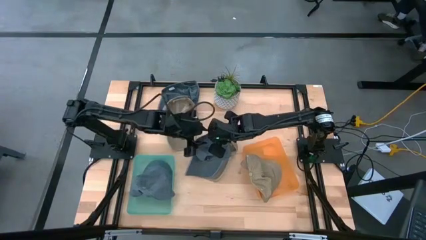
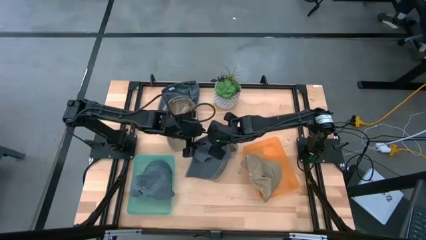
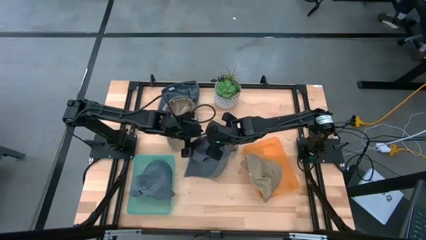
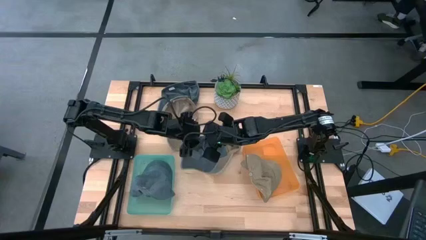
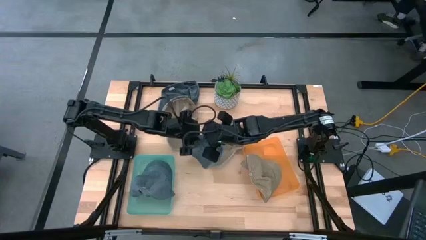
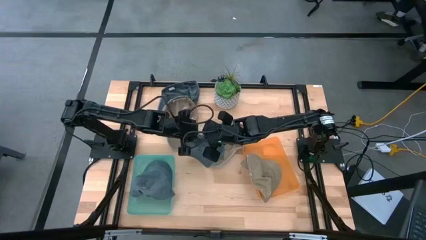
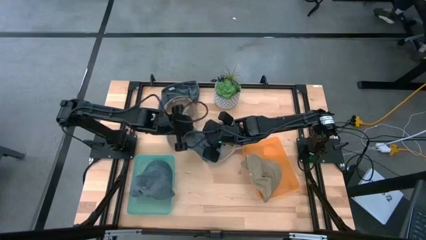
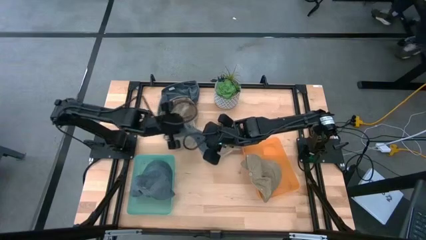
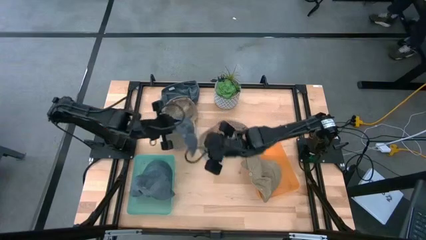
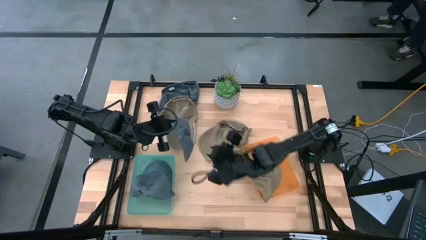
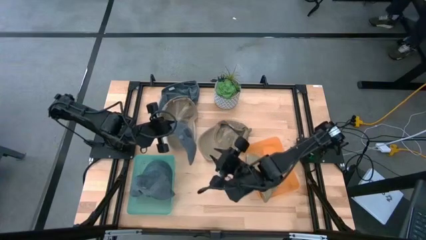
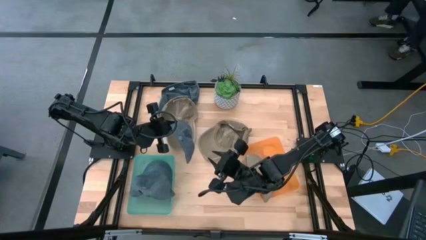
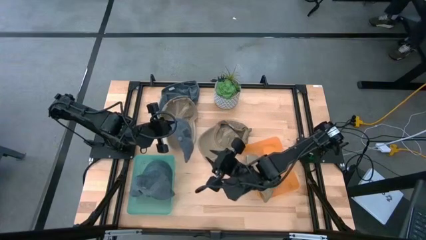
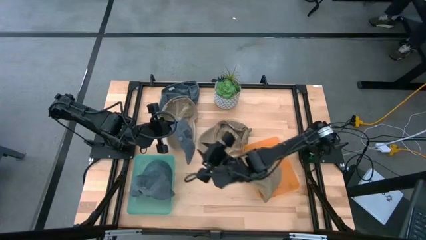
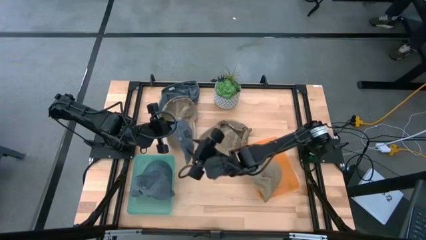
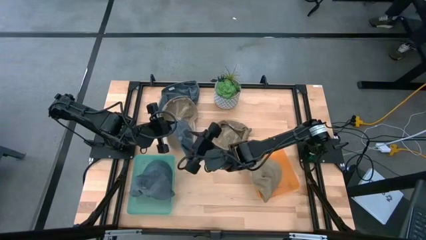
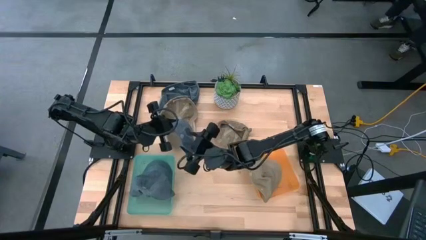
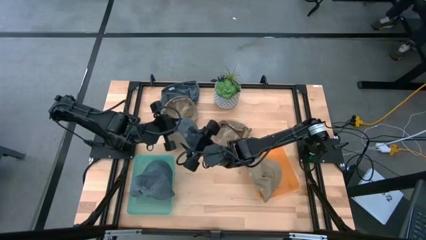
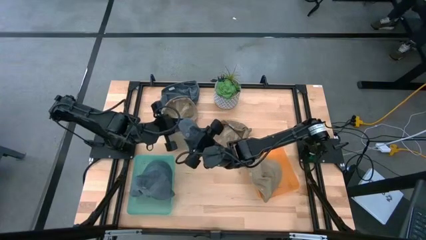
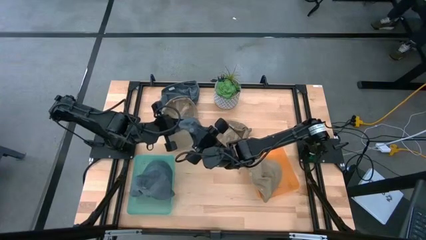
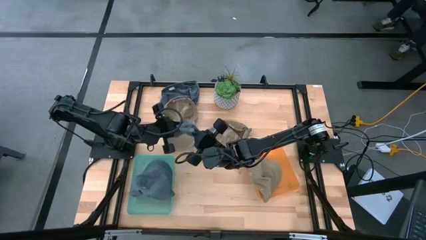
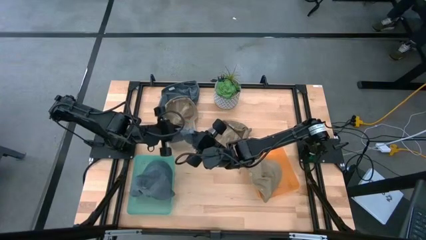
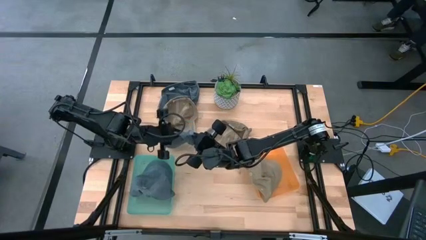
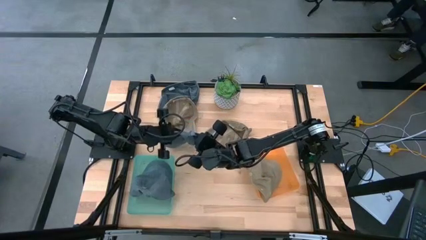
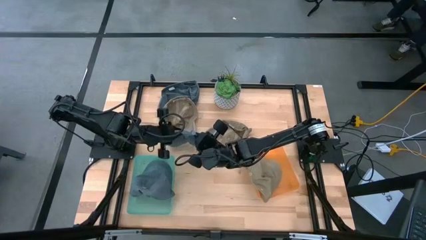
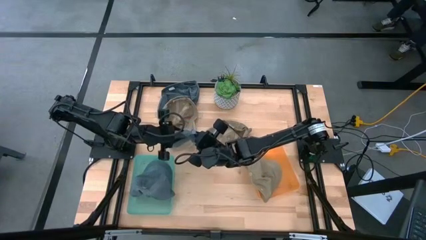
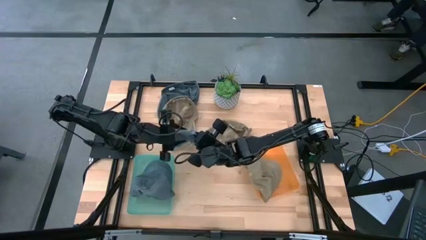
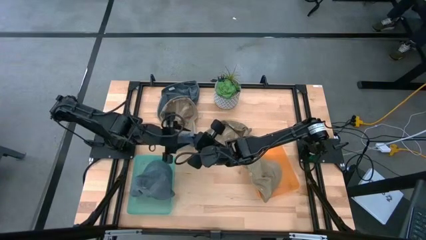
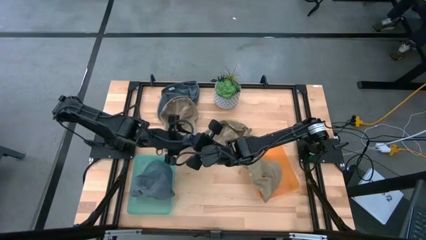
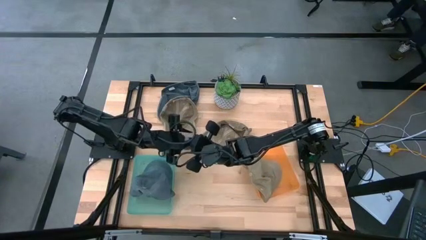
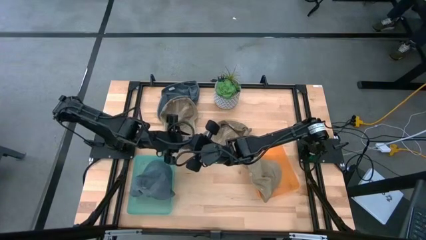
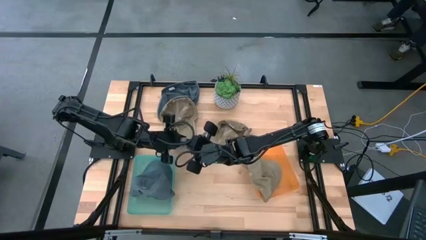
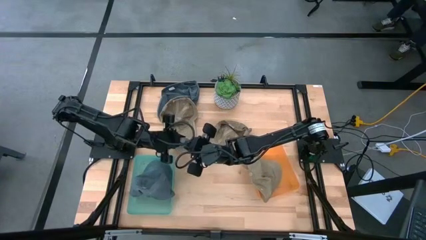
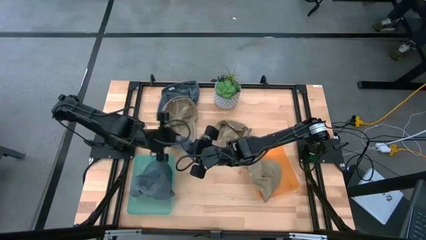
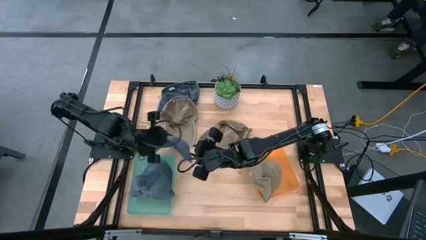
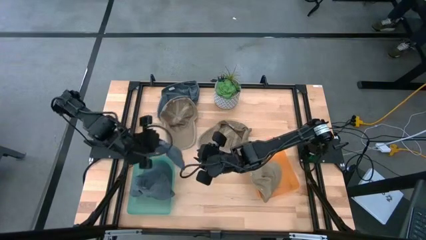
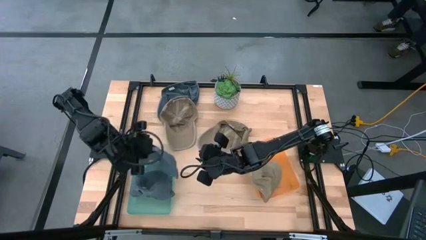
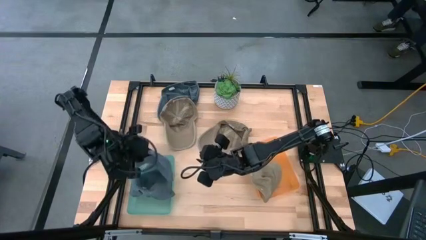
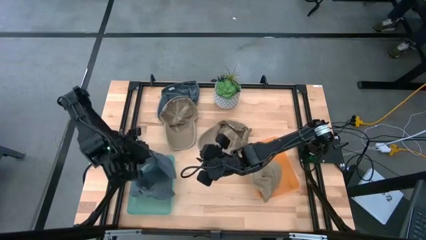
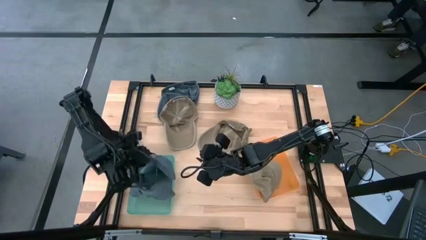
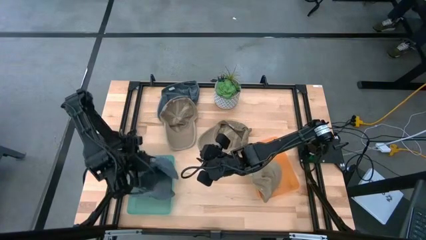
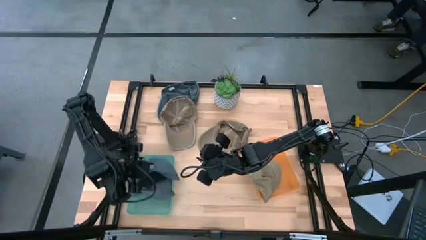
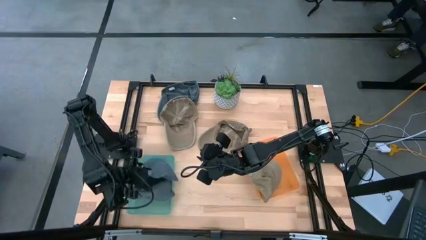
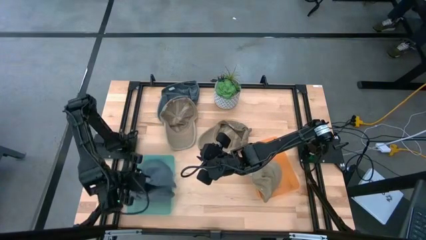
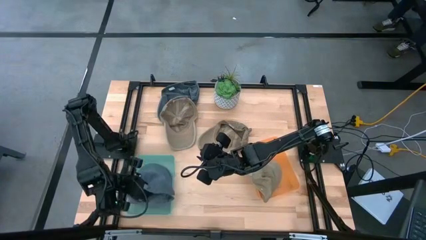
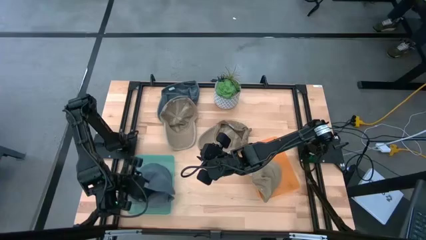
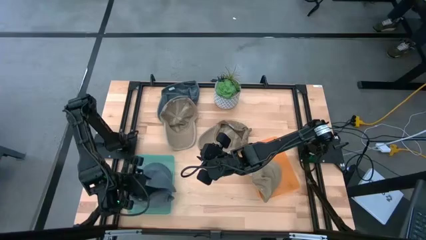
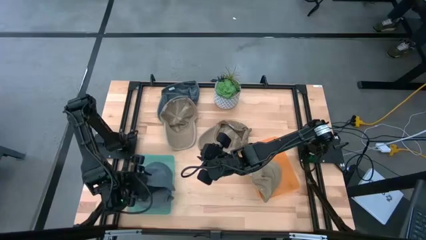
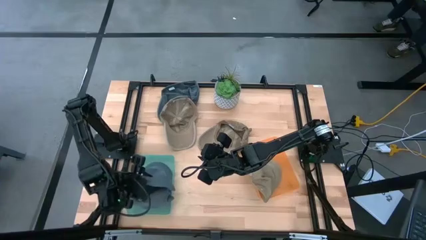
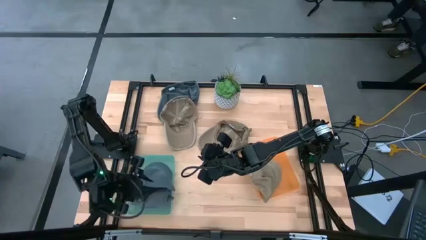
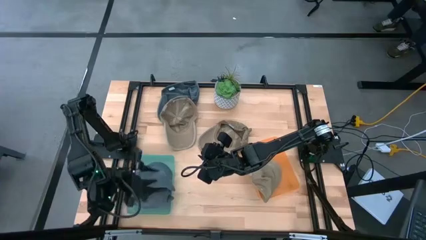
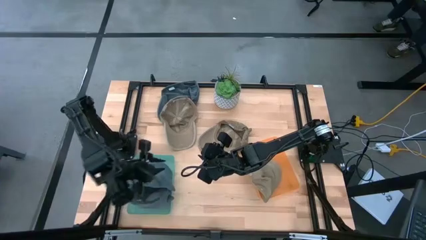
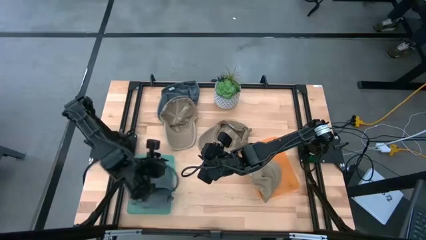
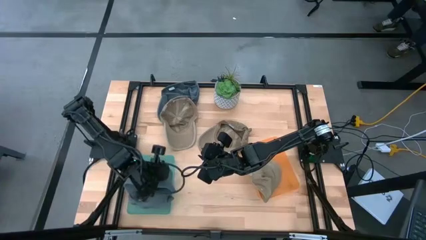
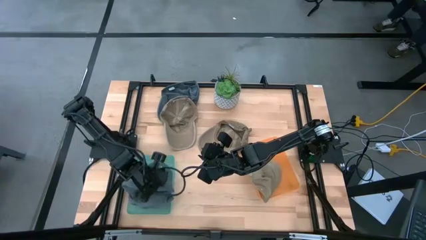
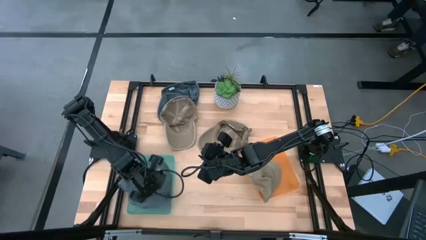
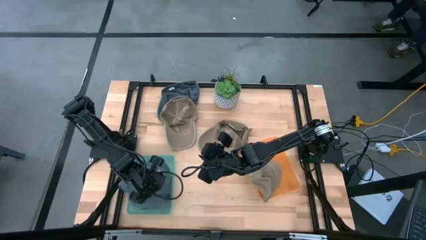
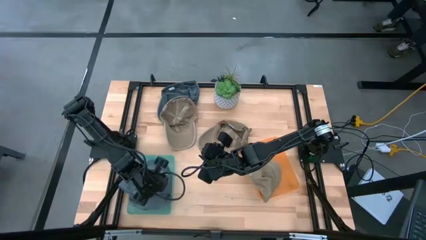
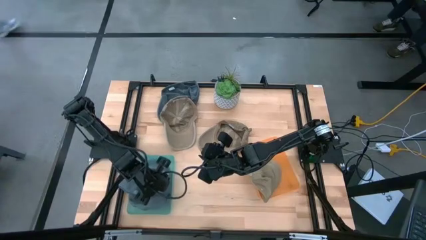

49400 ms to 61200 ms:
Task: Pick & Place hat
Put the right blue cap into the green bin

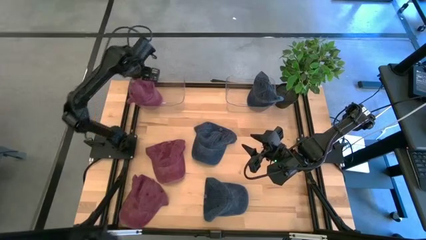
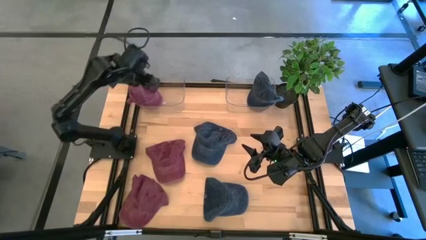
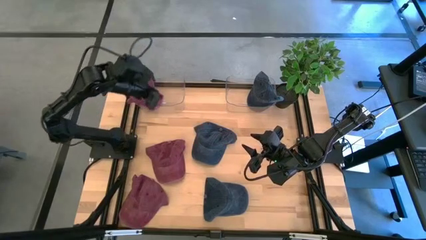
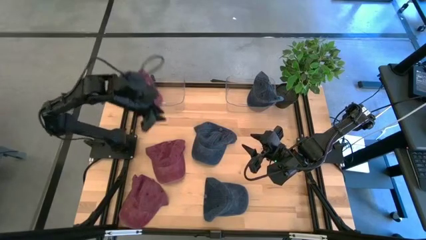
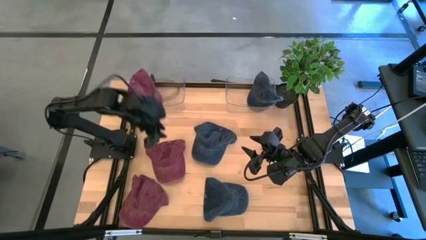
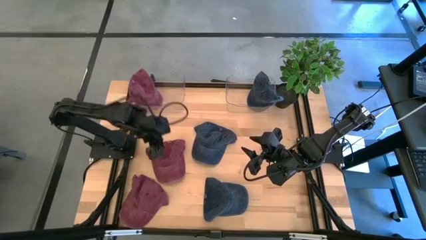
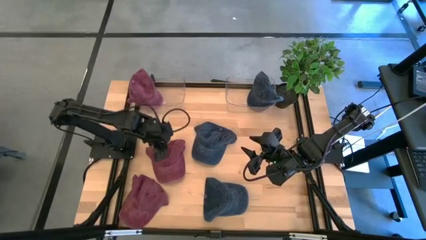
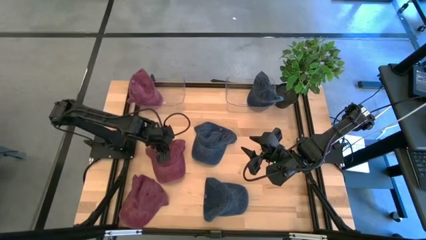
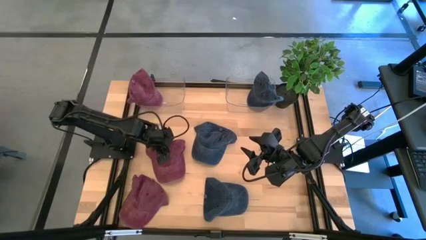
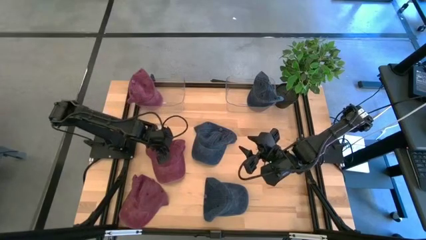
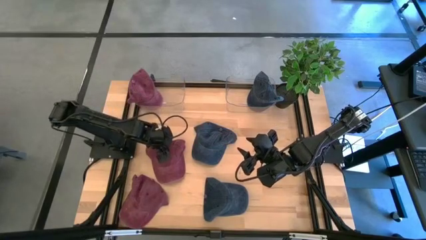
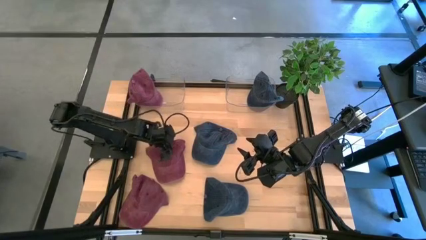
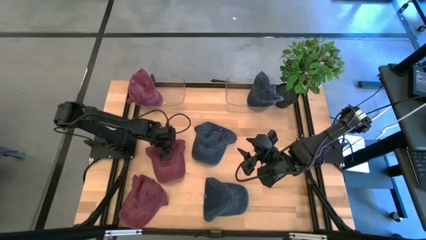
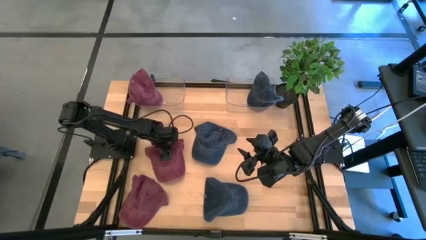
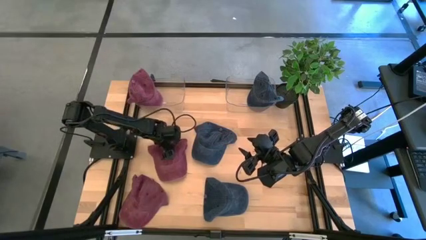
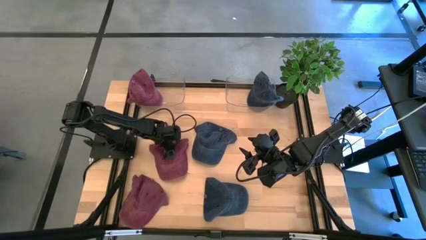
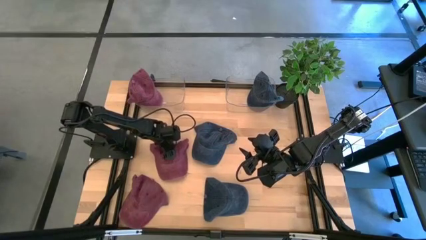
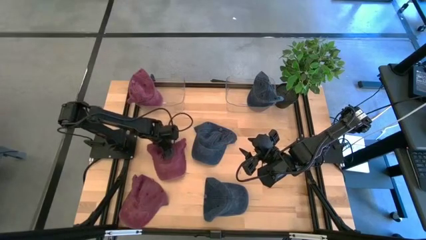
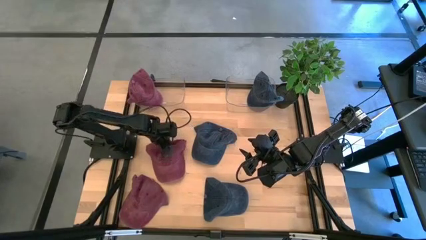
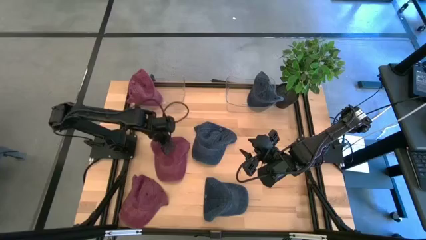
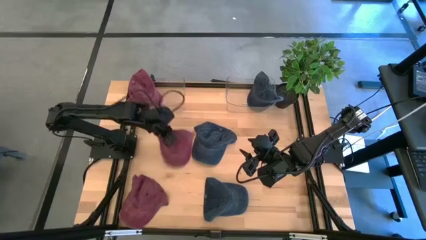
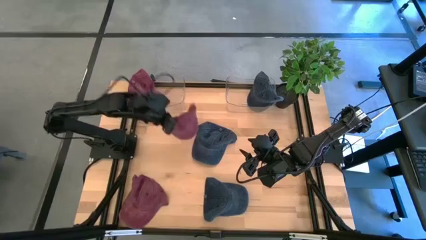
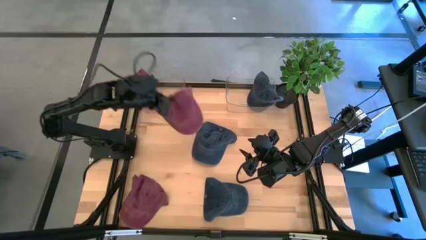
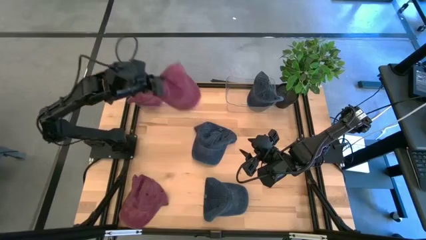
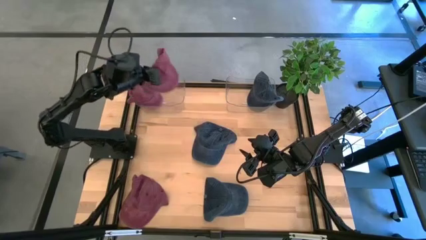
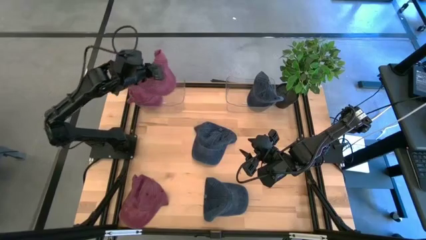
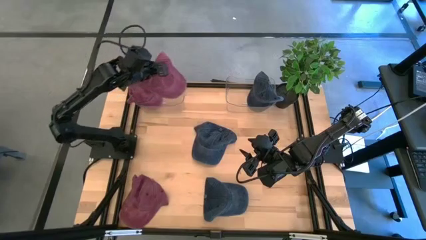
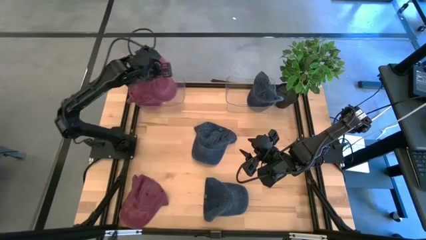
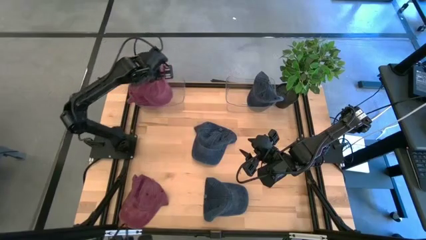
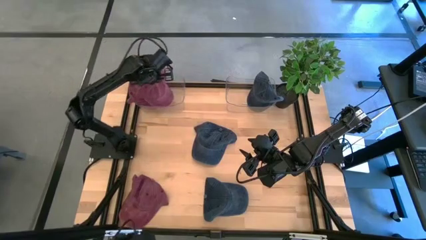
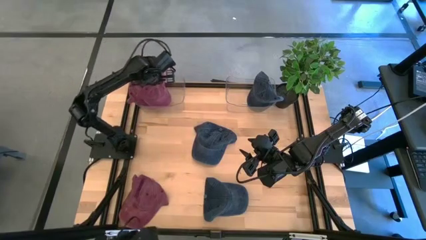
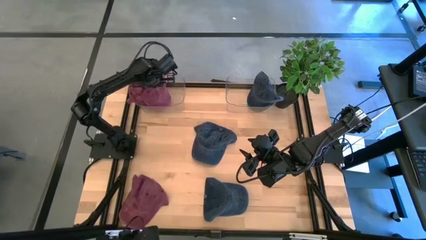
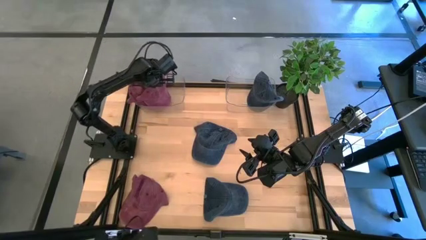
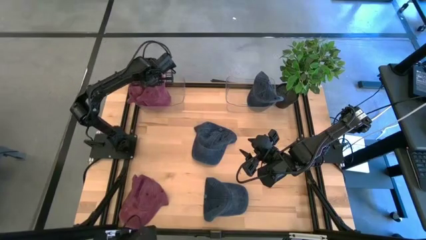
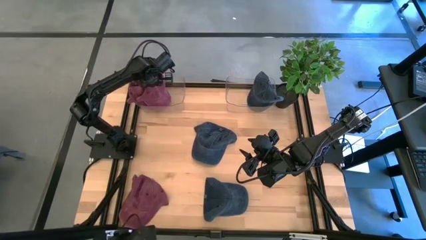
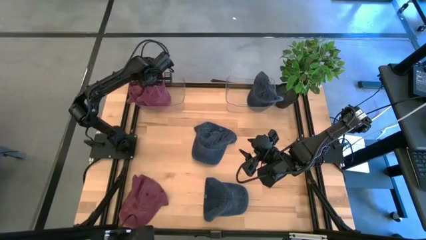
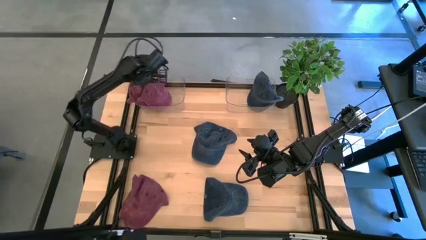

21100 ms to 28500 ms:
Task: Pick & Place hat
Put the top maroon cap into the left transparent bin
